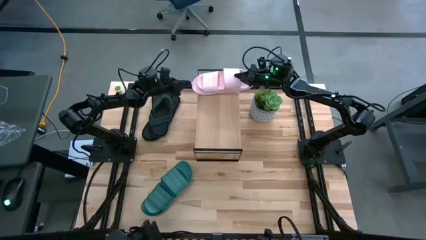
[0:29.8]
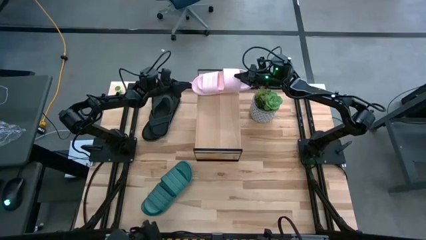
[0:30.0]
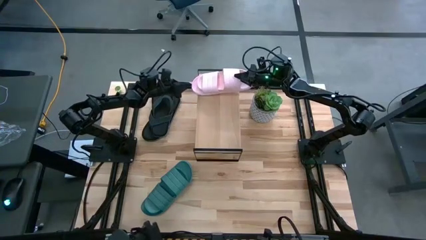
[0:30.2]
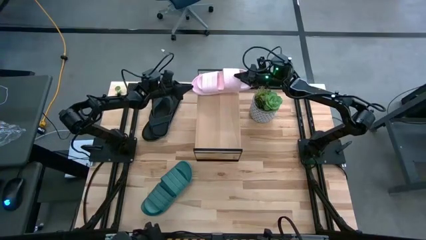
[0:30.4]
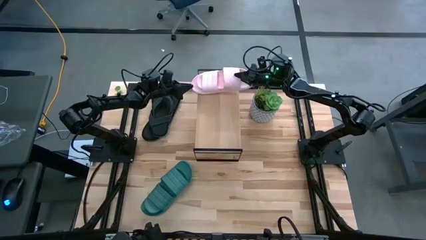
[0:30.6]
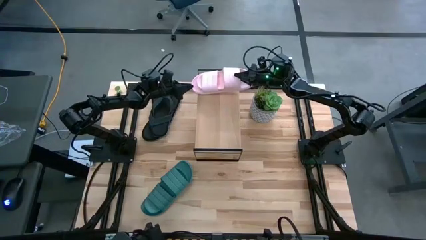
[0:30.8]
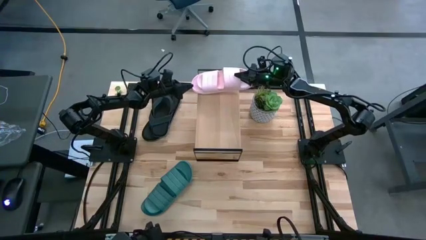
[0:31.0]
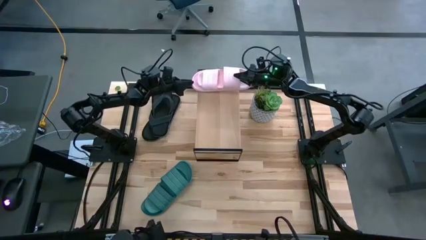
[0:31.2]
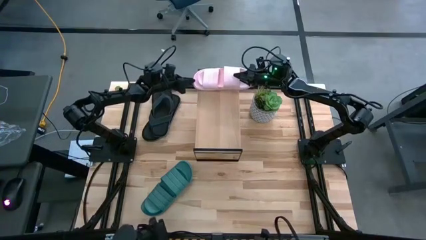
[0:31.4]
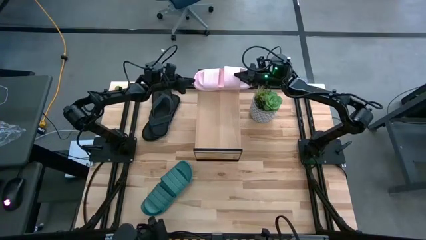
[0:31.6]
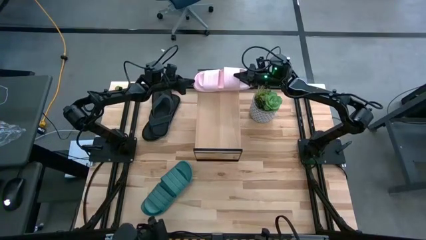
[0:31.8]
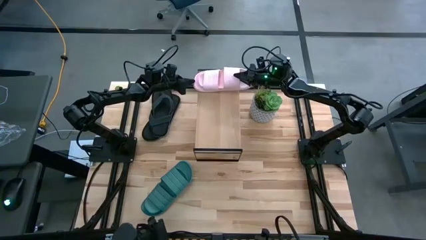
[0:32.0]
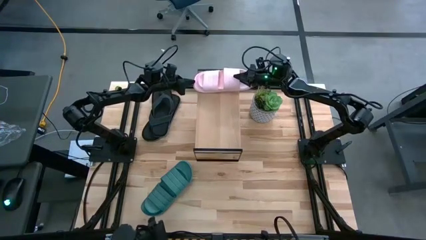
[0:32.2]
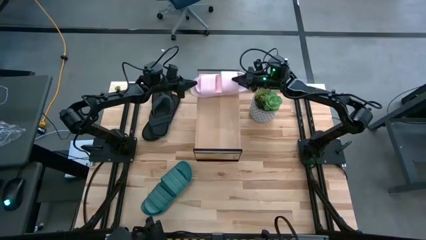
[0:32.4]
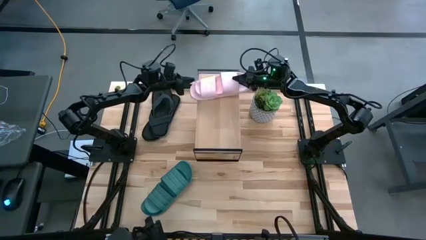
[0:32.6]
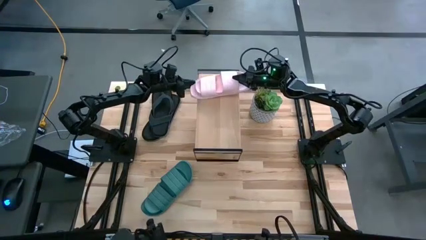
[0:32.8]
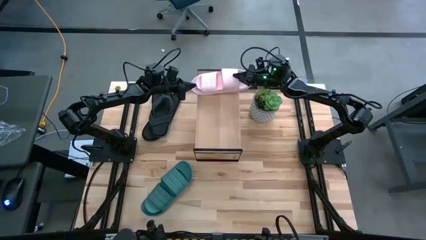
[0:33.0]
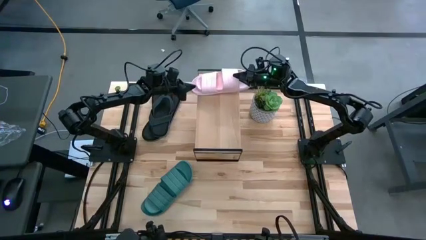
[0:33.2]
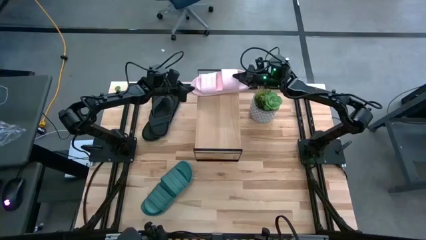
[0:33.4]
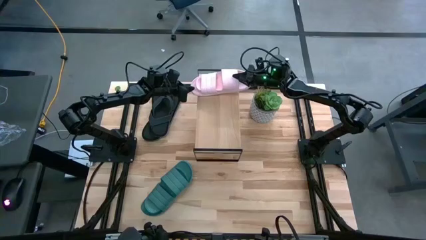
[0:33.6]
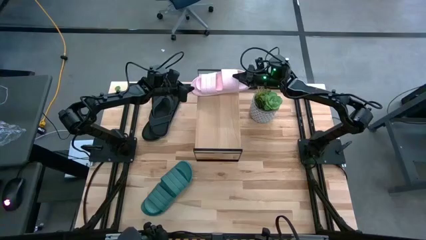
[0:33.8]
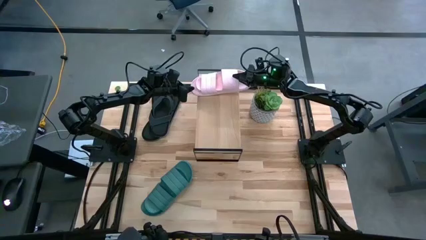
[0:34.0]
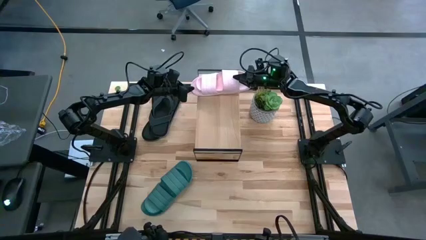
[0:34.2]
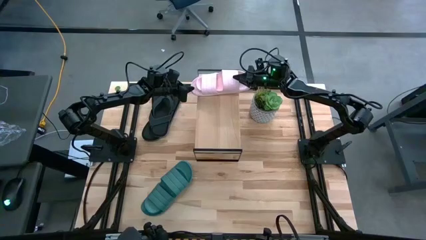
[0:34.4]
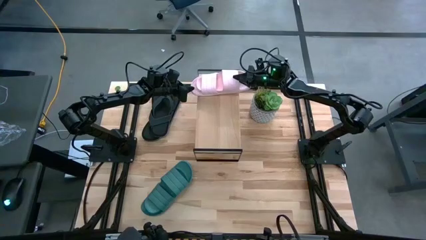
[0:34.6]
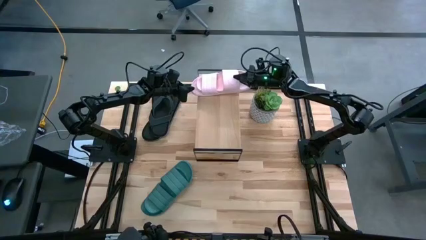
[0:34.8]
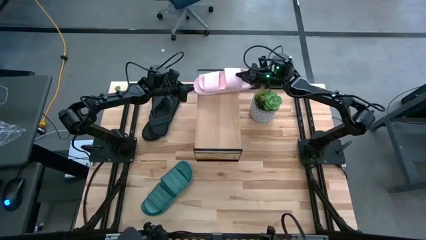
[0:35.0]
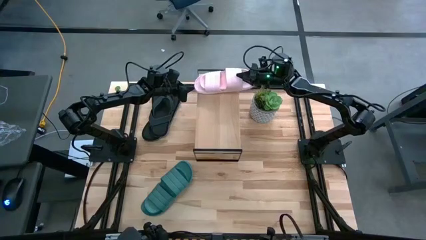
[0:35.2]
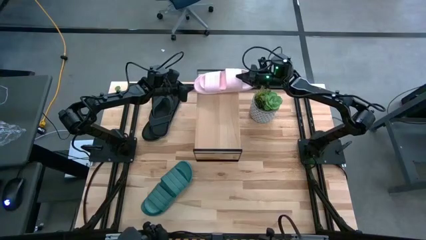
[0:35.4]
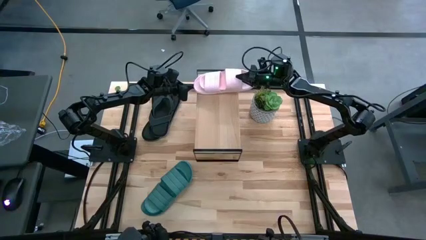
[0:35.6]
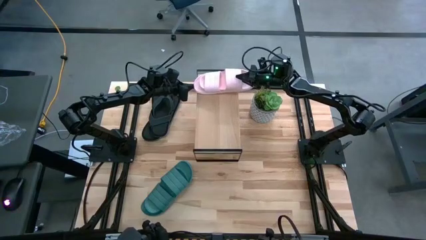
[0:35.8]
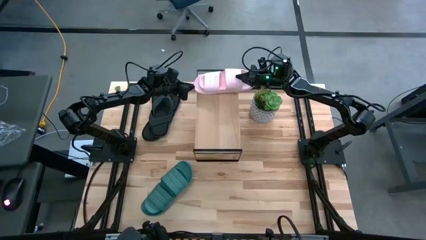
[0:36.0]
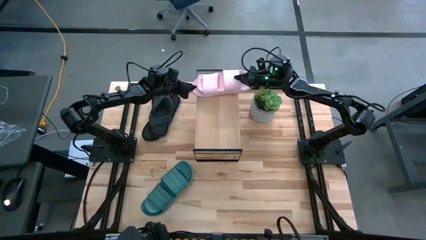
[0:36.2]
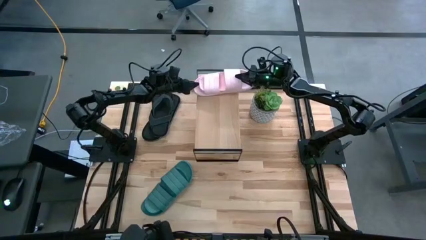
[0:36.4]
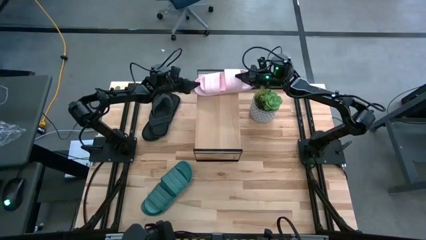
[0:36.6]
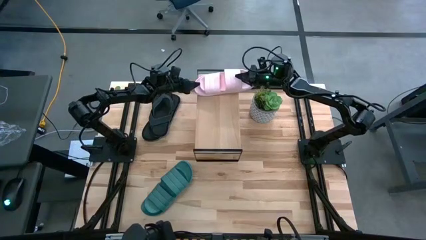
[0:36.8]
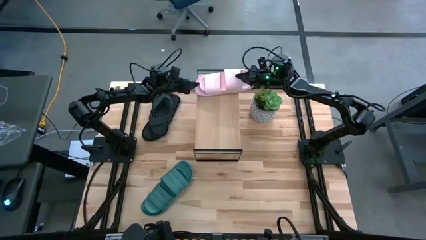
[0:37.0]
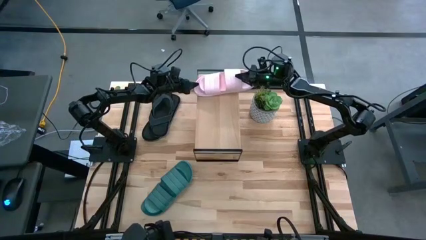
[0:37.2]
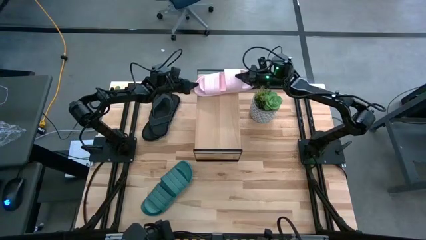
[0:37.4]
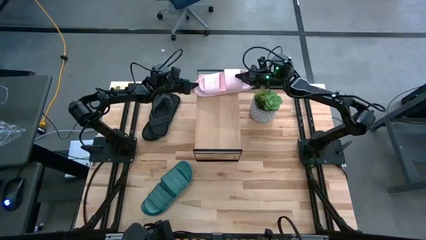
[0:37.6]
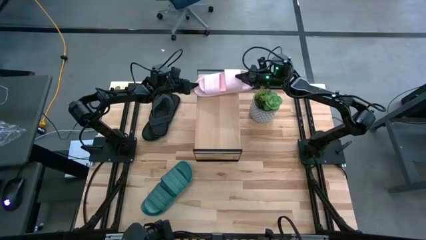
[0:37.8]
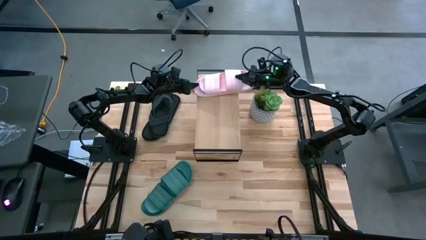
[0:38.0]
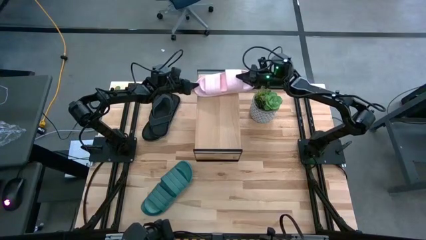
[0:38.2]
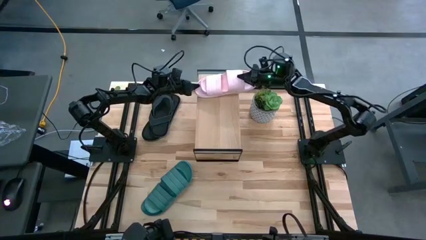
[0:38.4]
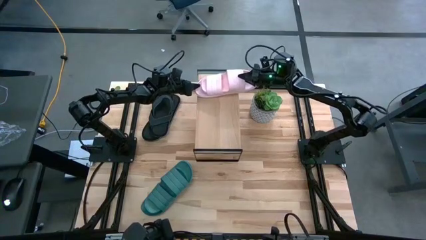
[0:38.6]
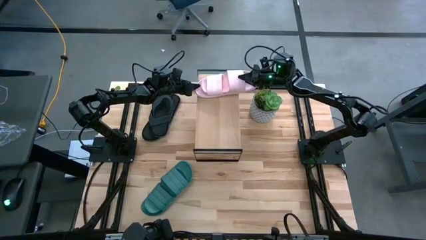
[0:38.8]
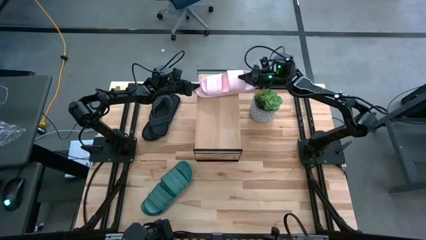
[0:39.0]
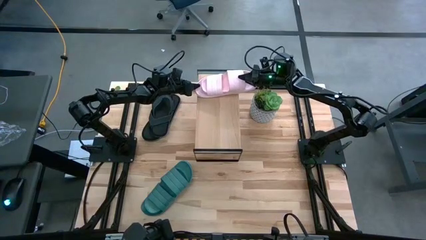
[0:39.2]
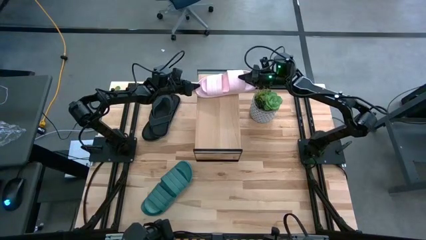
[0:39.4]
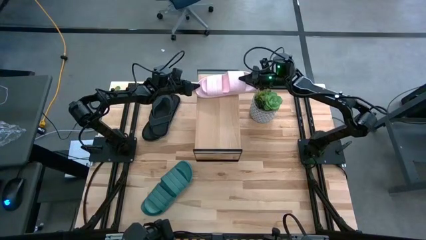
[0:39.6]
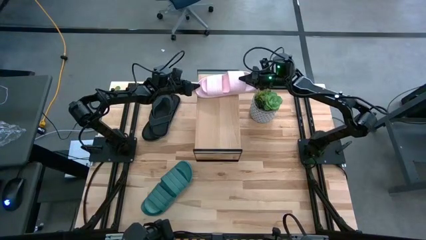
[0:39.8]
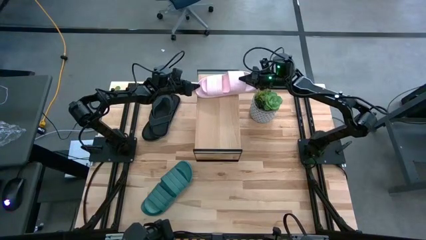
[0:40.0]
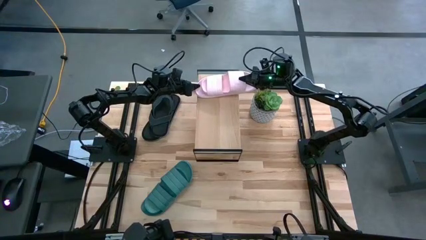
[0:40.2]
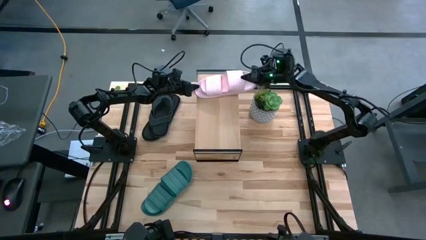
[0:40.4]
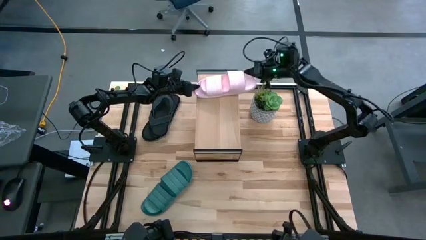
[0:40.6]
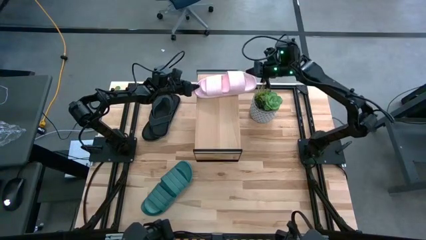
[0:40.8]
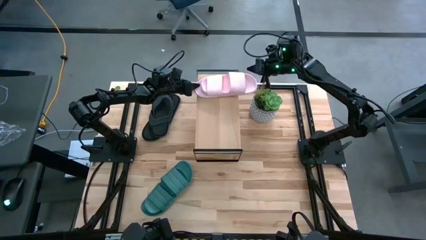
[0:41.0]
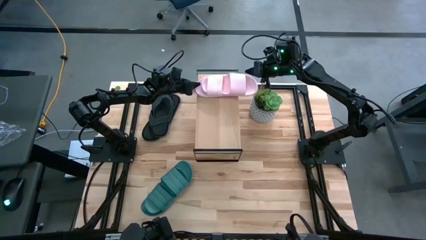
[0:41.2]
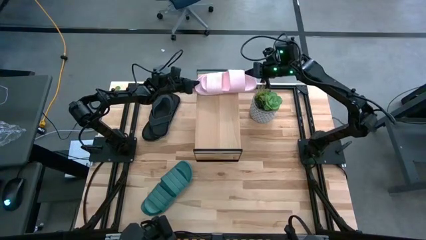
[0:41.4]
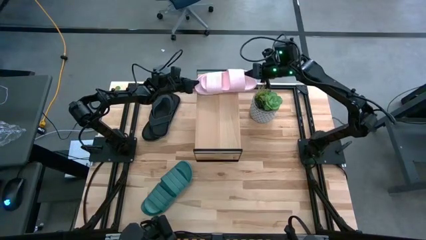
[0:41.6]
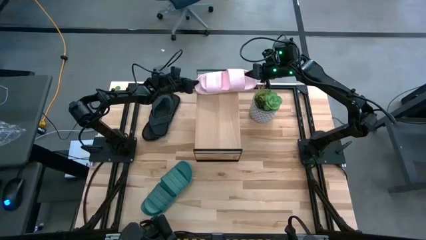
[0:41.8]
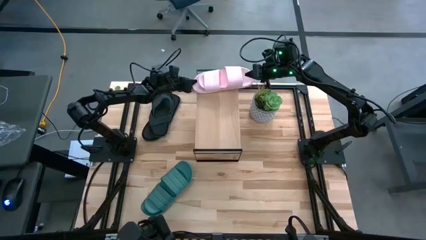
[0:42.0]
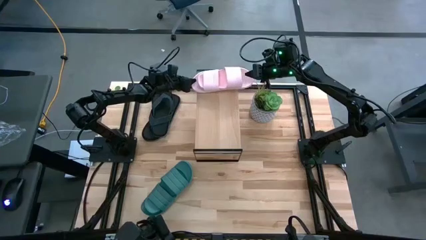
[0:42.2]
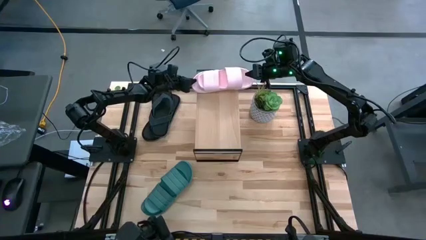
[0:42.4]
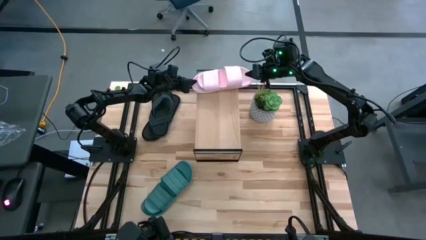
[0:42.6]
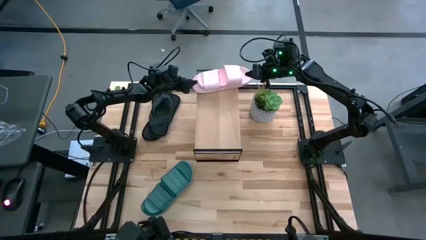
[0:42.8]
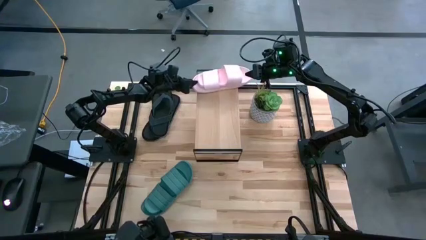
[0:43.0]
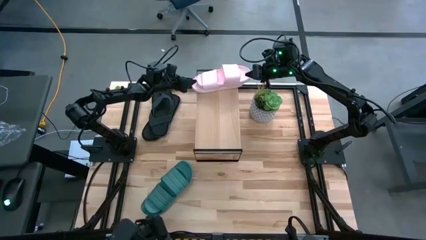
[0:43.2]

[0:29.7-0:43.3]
Task: Pick and place slippers onto the shelf
Put the pink pair of slippers on the shelf
